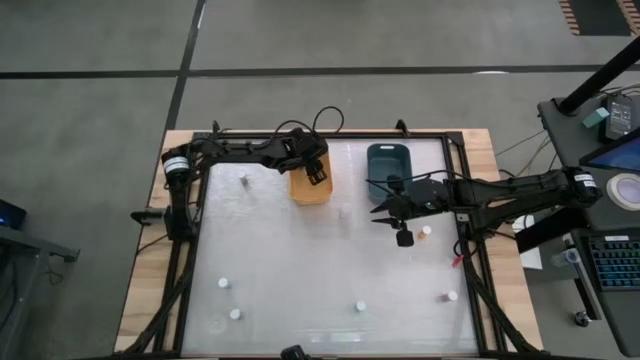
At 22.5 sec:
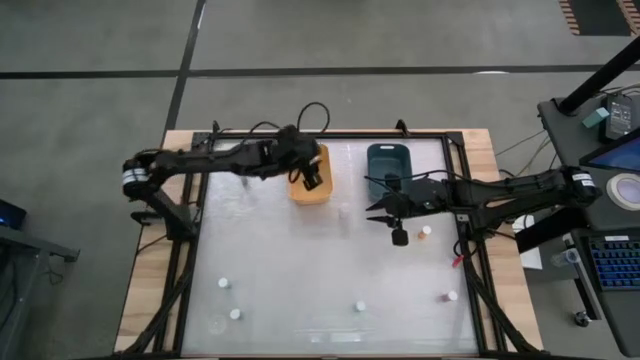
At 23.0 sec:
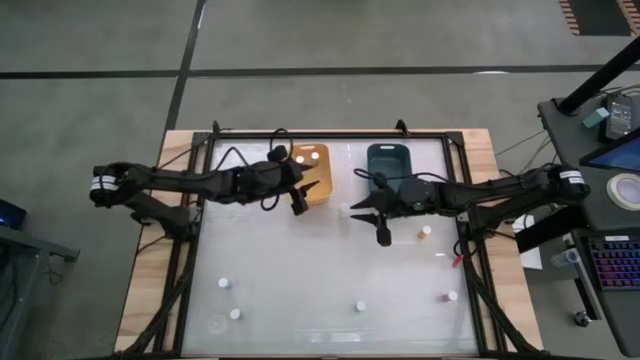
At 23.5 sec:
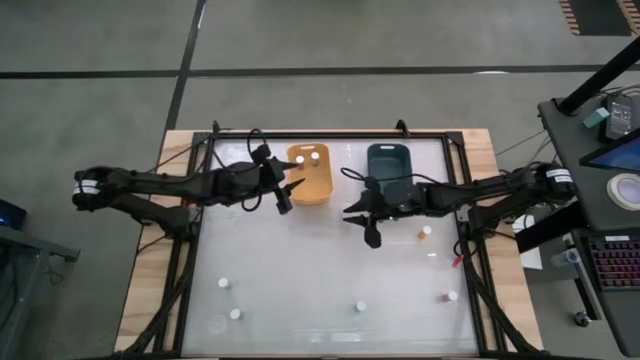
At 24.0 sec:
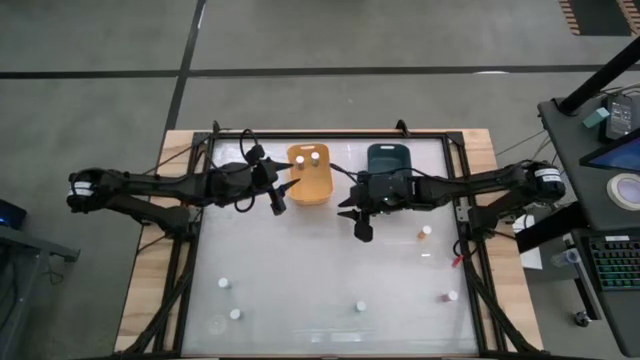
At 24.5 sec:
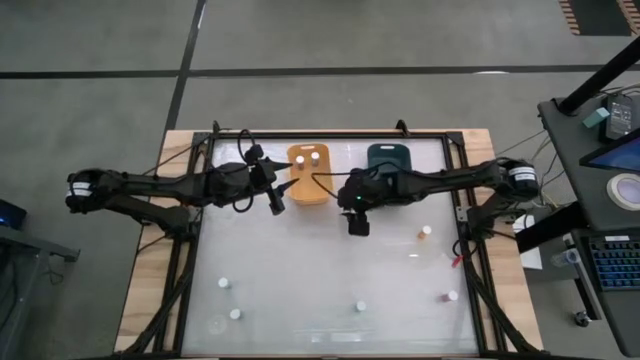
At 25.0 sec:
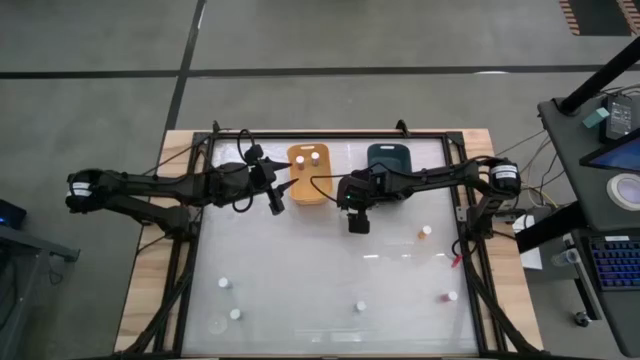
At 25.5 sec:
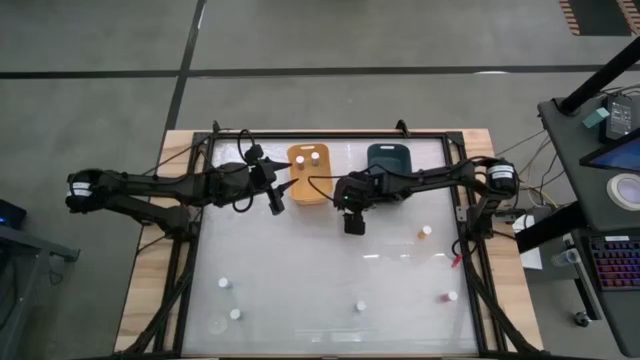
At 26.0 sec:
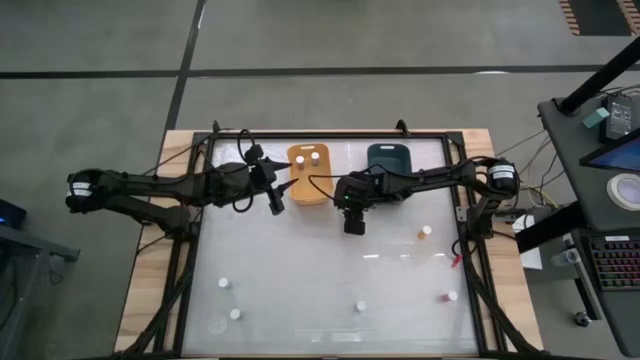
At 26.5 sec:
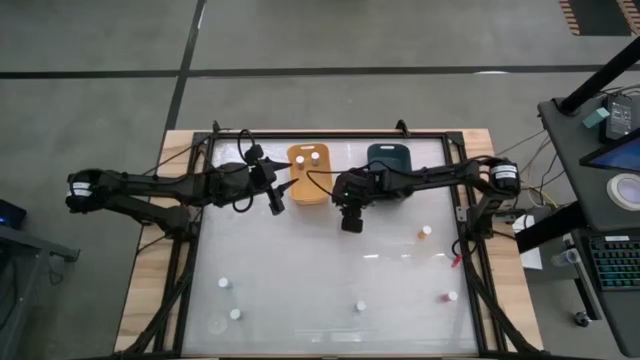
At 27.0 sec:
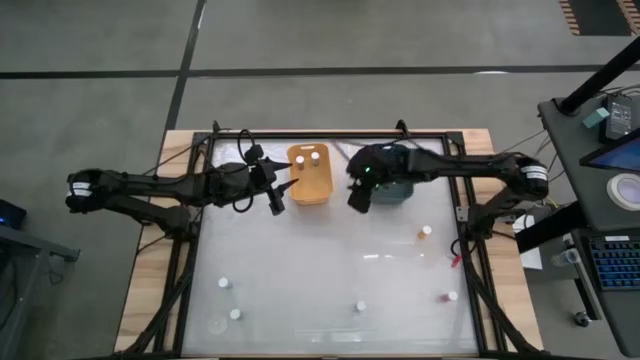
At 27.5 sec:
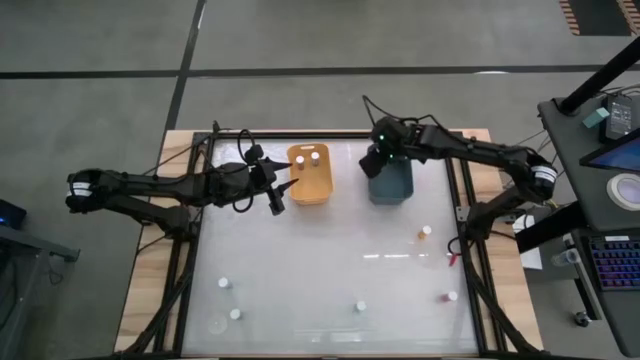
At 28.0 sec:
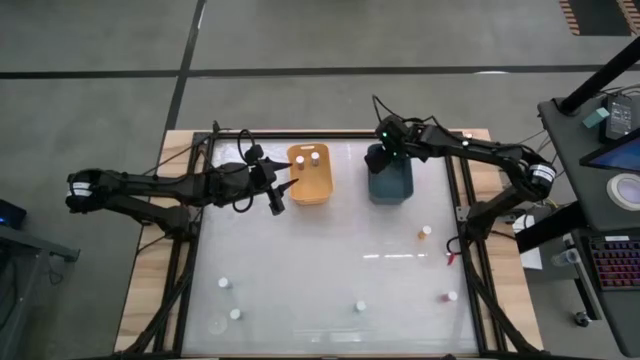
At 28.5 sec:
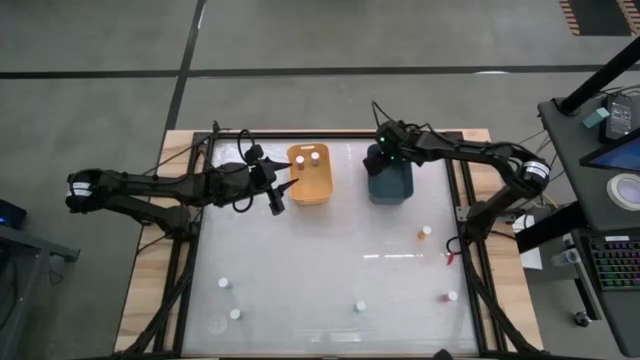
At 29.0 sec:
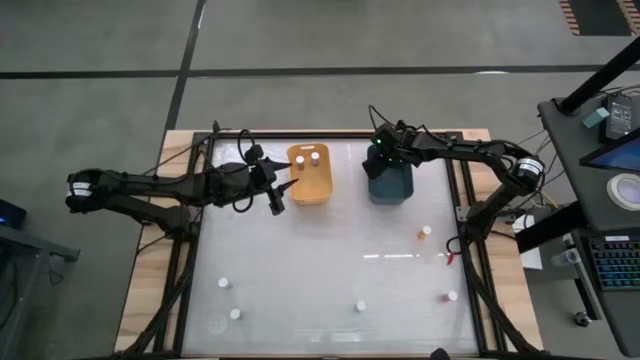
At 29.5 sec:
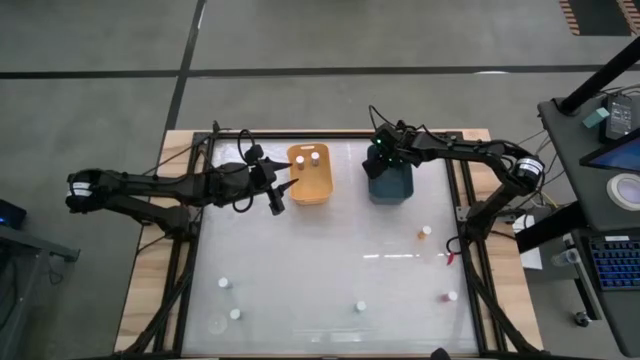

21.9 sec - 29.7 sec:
Task: Pick and place medicine bottles into bin by pill shape (circle, oval)
Put the white tablet bottle into the green bin

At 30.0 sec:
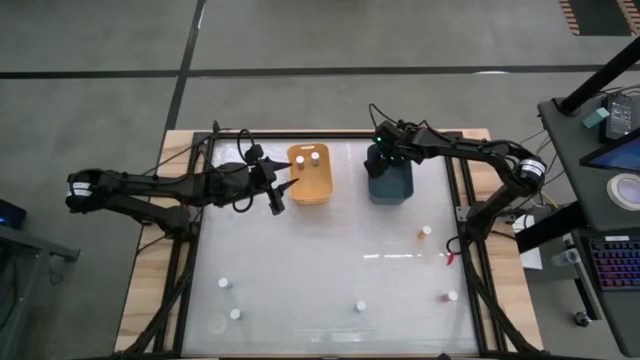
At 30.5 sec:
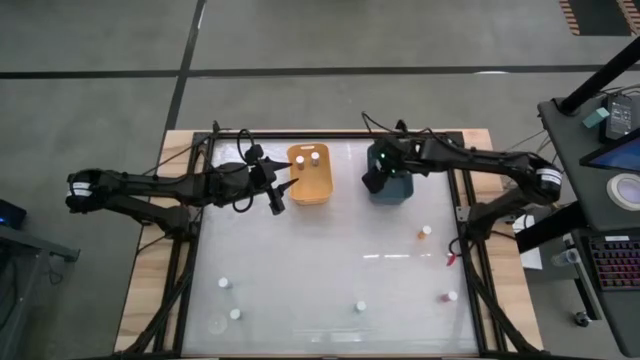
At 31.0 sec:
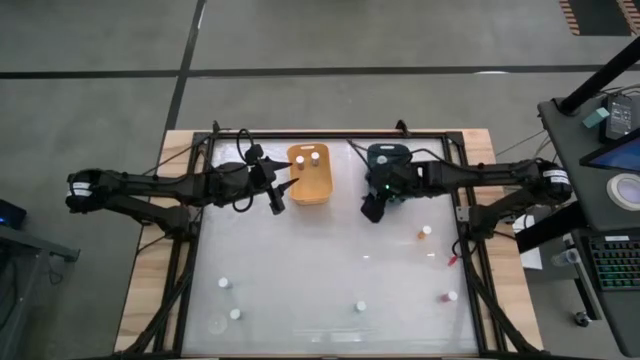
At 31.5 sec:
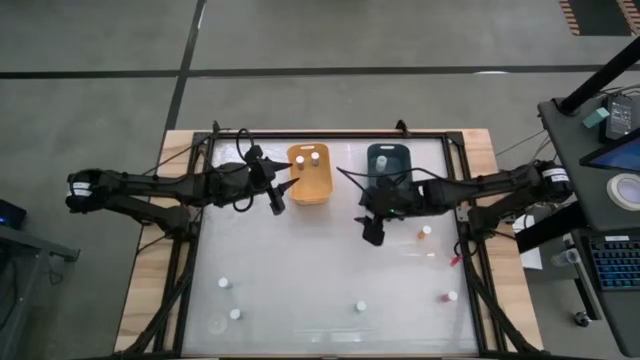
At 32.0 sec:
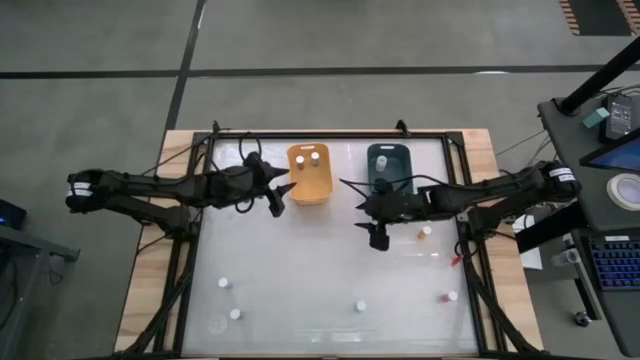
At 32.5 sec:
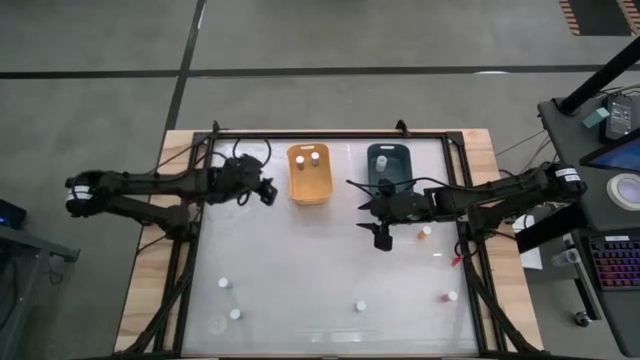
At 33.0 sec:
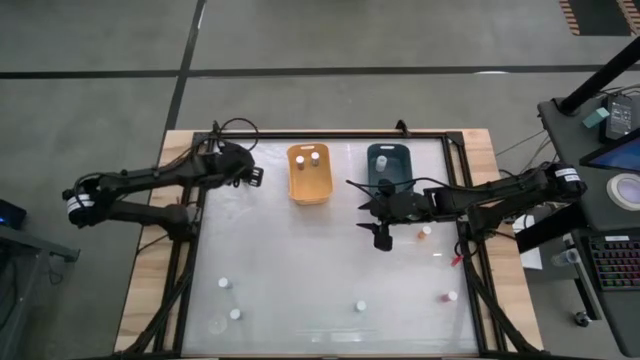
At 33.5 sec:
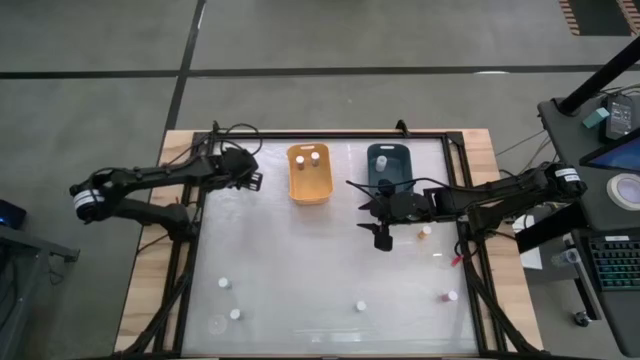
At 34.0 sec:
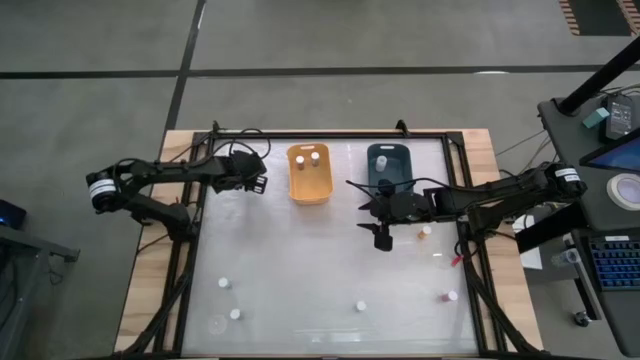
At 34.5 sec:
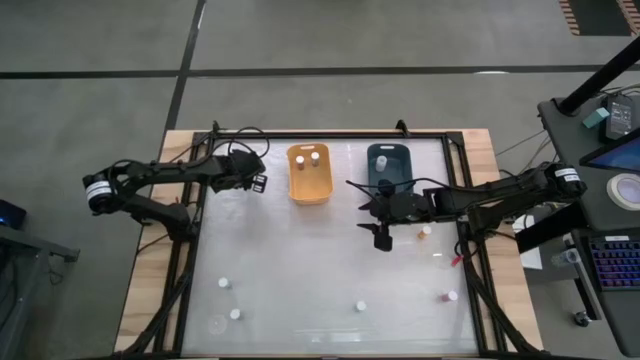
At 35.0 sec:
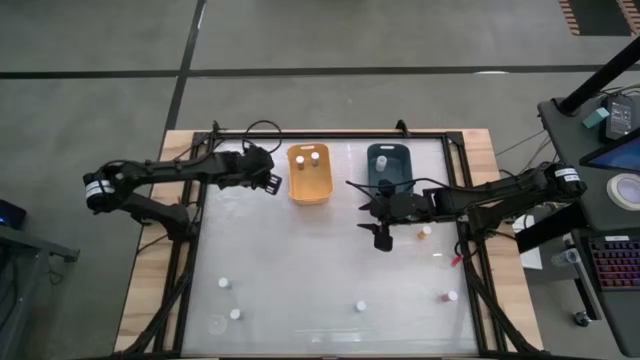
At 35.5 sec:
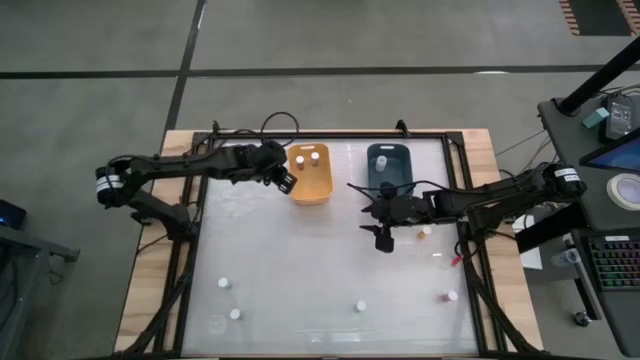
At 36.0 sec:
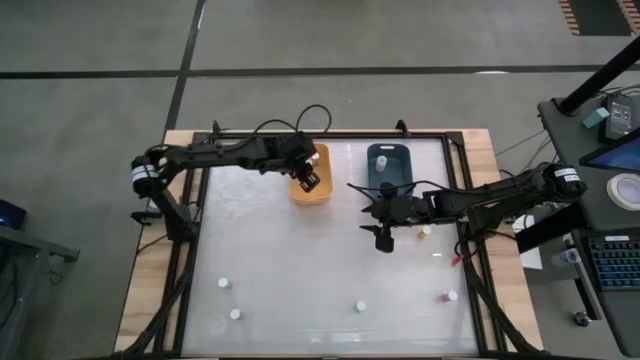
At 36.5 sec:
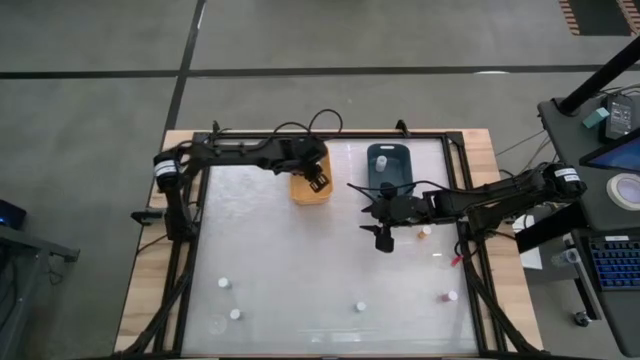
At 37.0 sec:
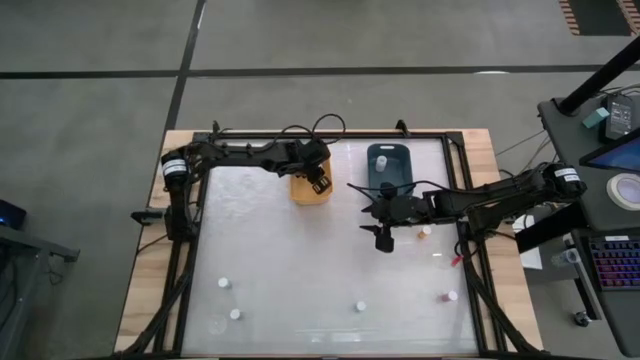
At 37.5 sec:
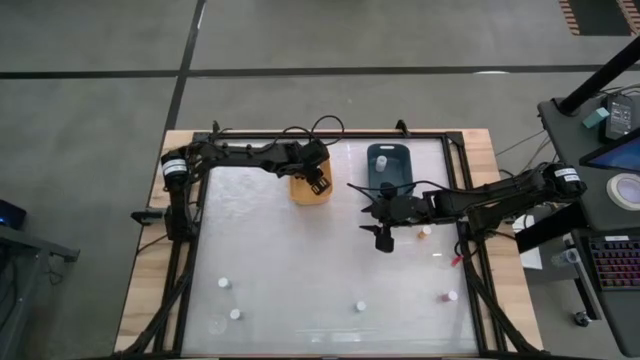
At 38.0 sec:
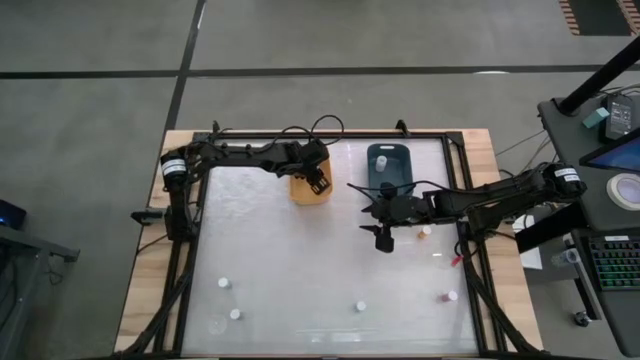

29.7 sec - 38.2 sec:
Put the top blue capsule bottle into the yellow bin

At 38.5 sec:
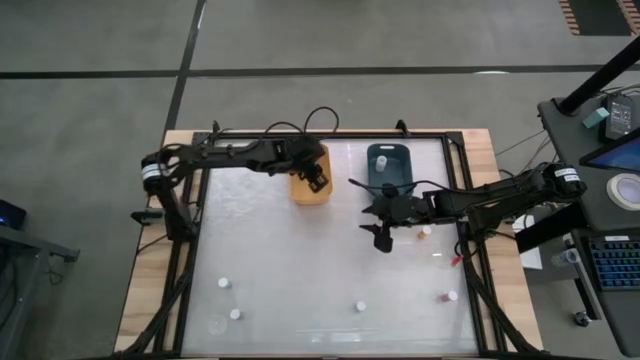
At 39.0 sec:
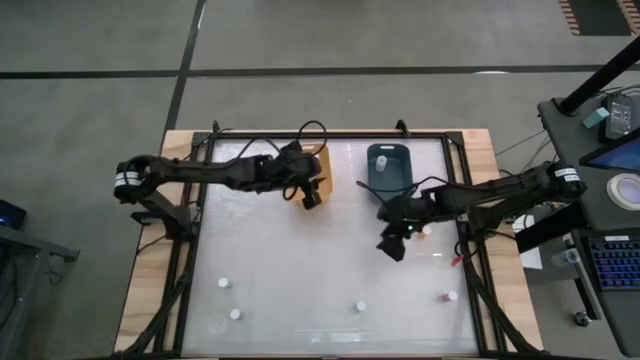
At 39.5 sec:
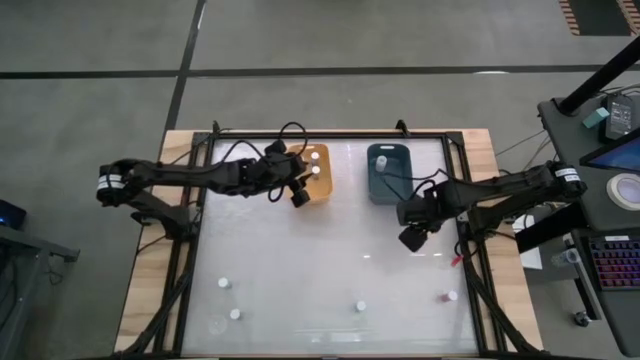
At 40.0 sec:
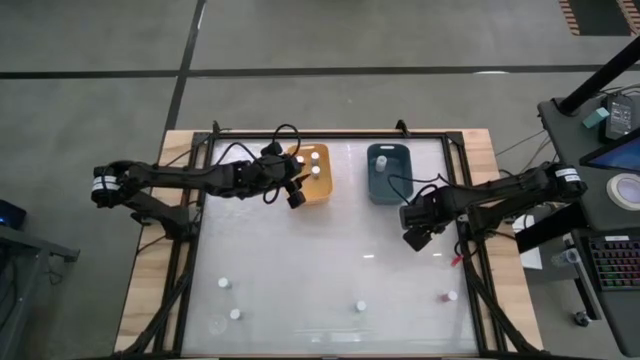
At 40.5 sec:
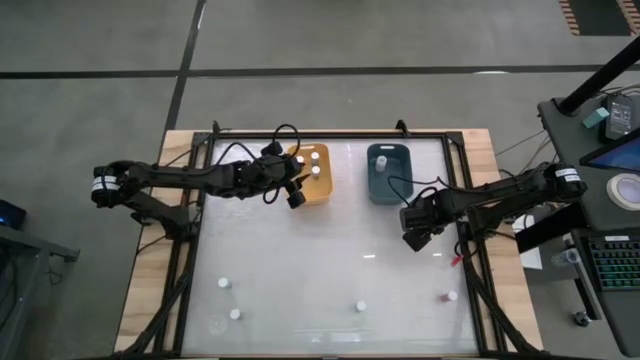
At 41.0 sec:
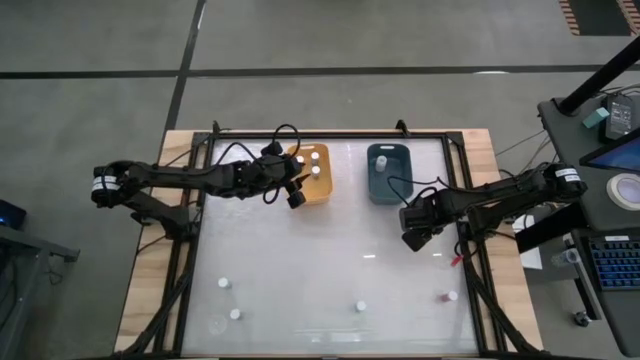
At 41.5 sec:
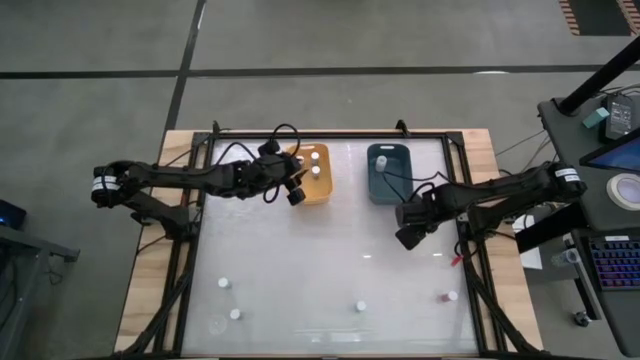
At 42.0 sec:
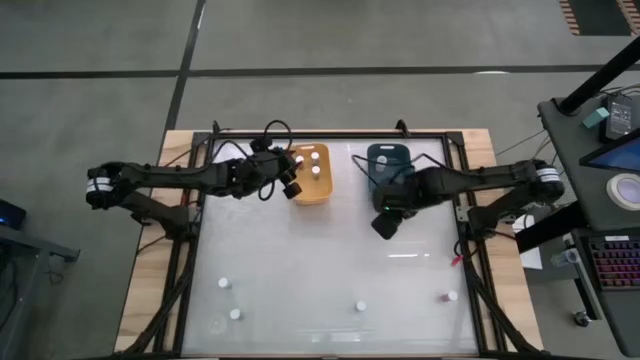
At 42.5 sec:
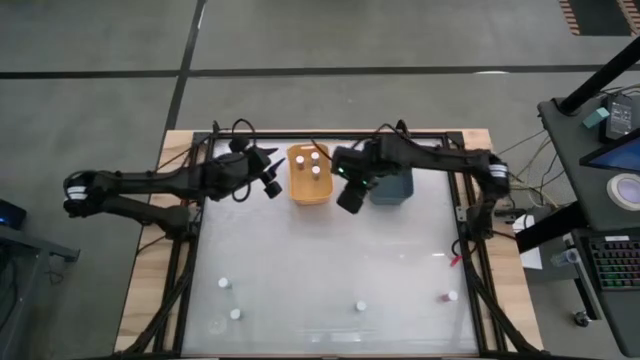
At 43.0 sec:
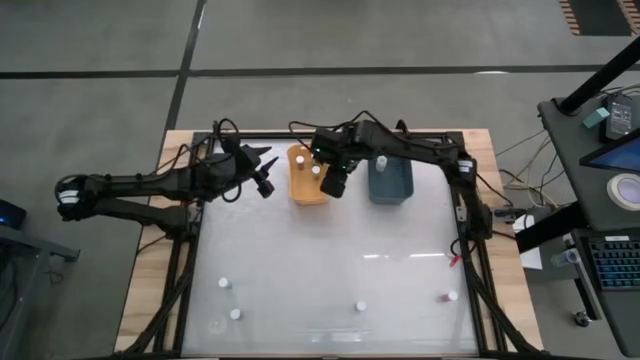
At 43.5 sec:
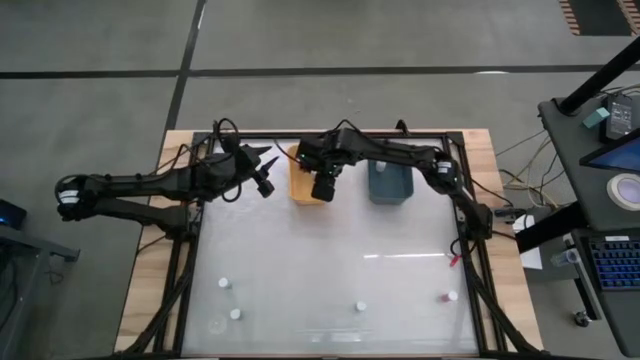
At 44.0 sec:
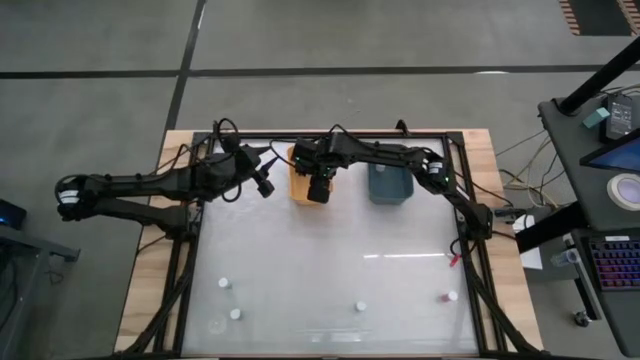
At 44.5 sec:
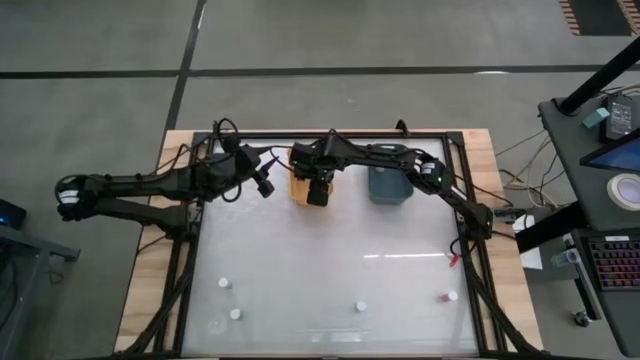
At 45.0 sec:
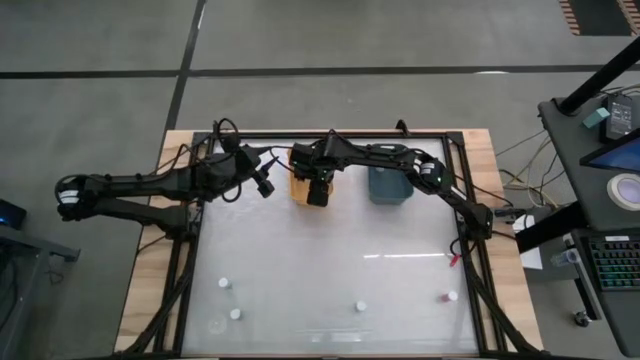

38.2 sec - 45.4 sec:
Put the yellow capsule bottle into the yellow bin
